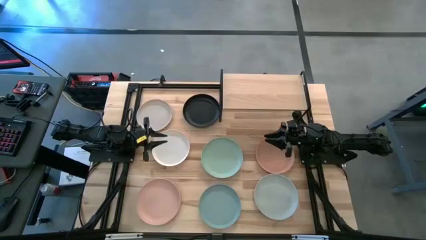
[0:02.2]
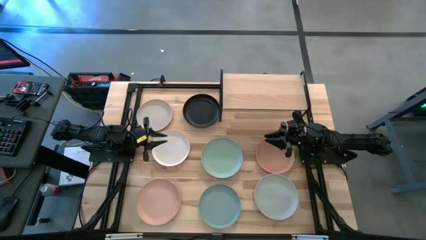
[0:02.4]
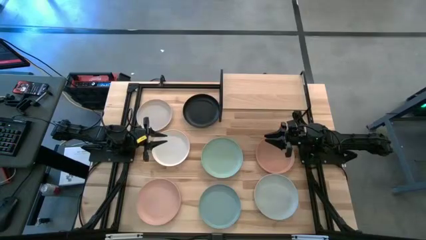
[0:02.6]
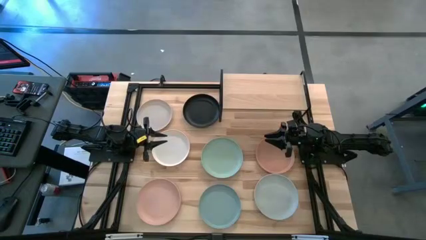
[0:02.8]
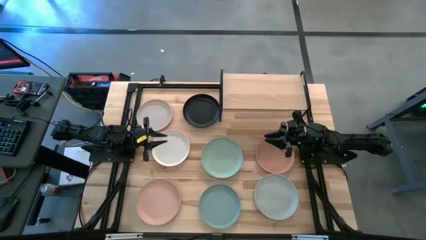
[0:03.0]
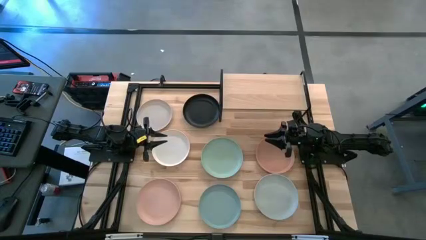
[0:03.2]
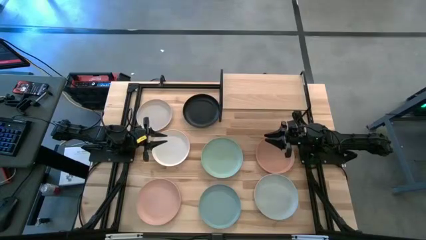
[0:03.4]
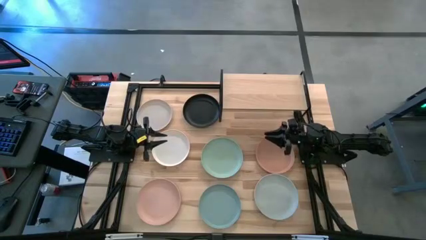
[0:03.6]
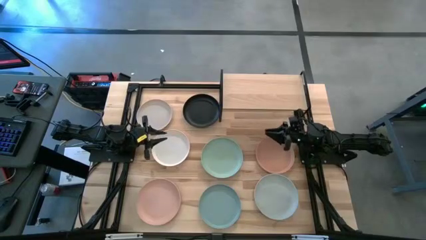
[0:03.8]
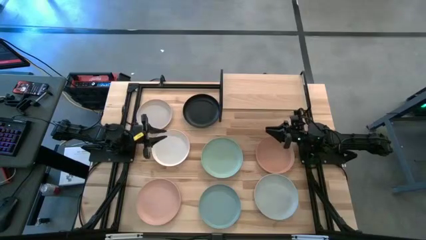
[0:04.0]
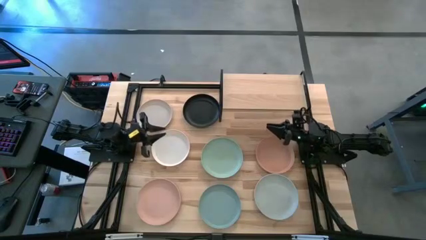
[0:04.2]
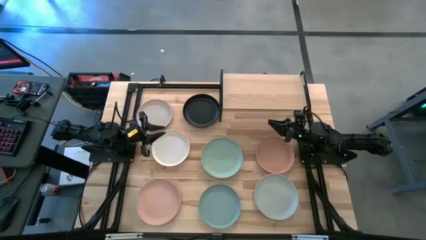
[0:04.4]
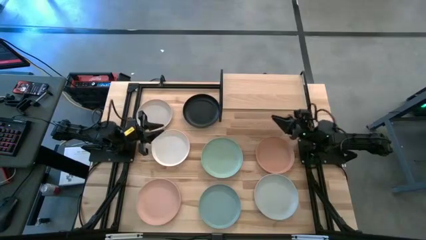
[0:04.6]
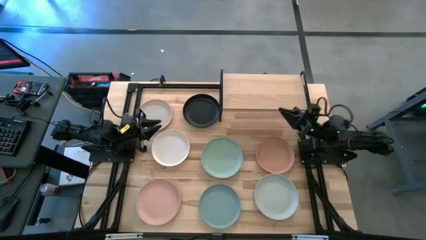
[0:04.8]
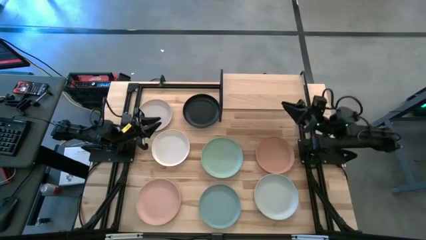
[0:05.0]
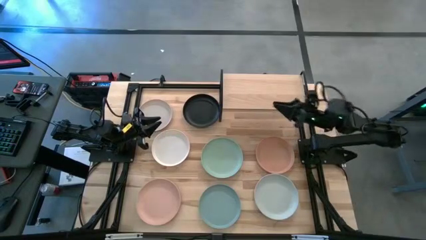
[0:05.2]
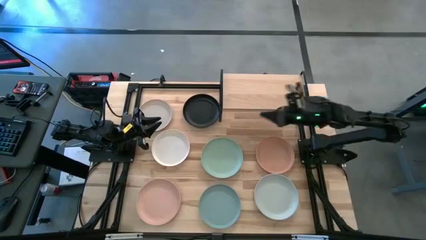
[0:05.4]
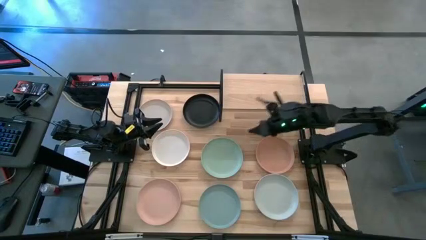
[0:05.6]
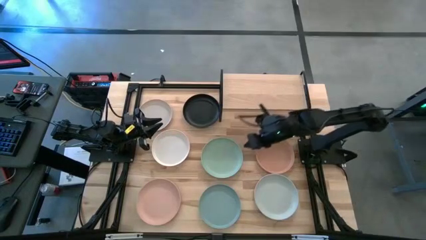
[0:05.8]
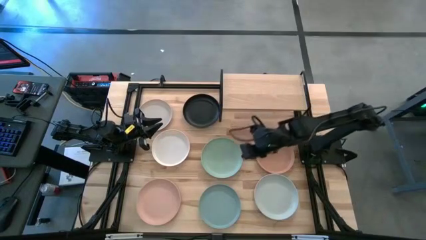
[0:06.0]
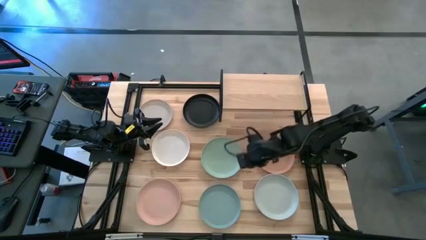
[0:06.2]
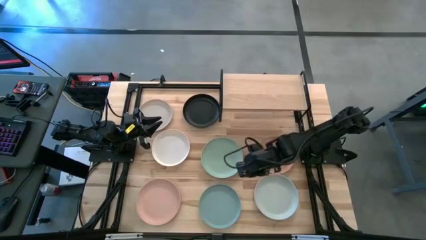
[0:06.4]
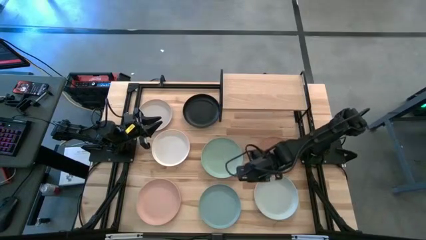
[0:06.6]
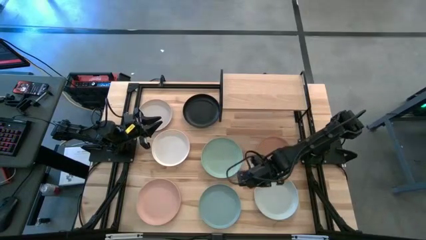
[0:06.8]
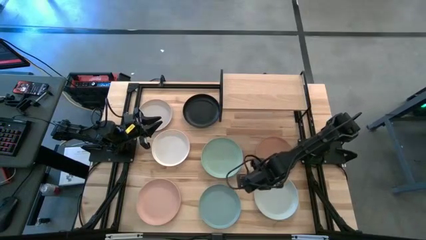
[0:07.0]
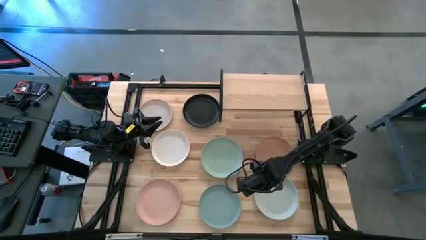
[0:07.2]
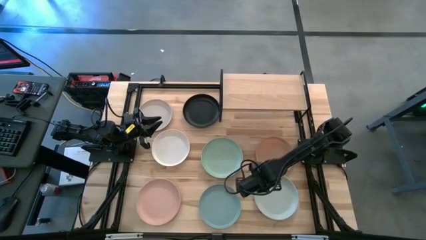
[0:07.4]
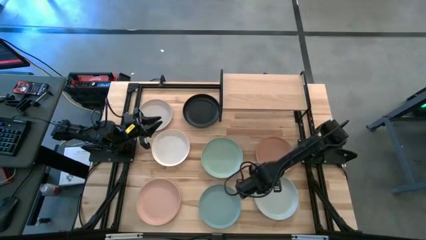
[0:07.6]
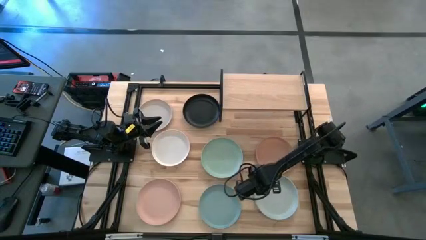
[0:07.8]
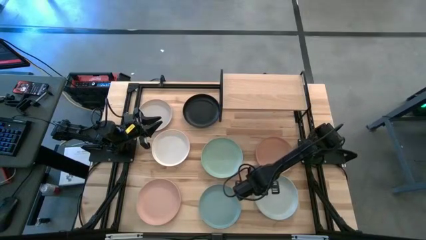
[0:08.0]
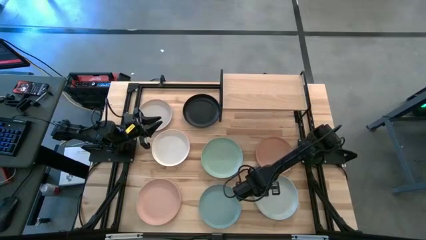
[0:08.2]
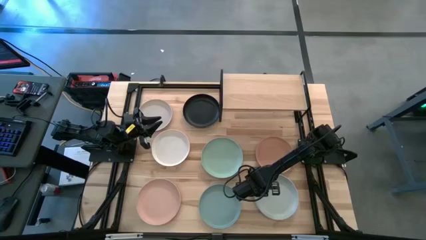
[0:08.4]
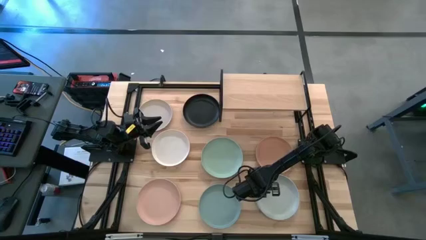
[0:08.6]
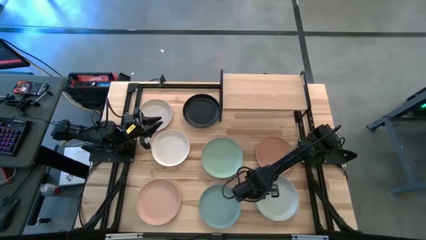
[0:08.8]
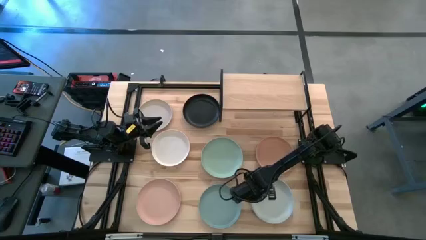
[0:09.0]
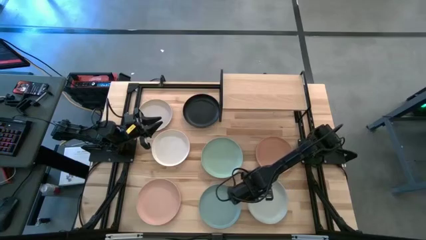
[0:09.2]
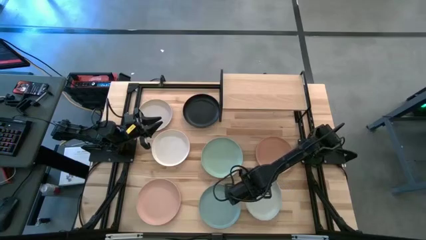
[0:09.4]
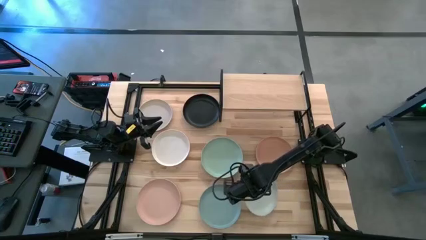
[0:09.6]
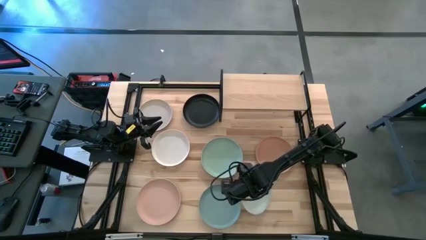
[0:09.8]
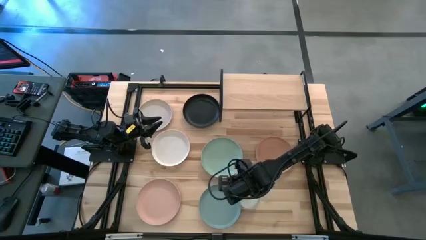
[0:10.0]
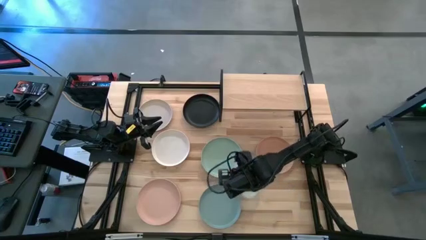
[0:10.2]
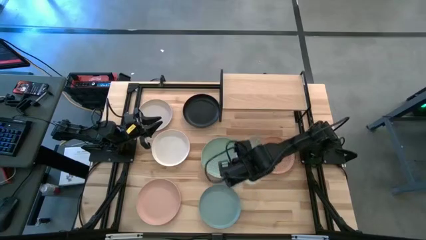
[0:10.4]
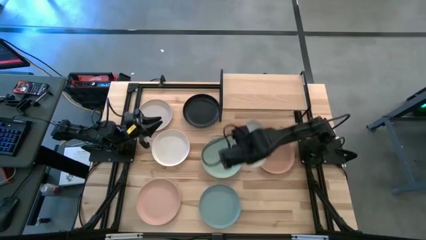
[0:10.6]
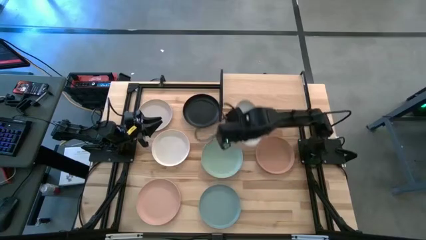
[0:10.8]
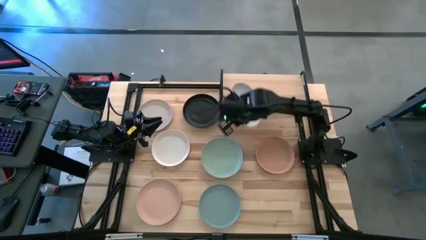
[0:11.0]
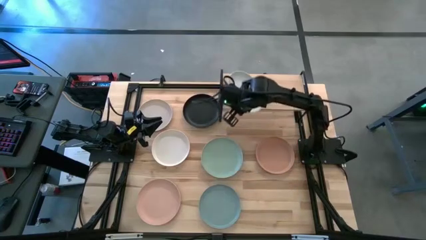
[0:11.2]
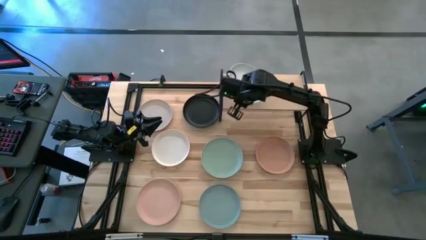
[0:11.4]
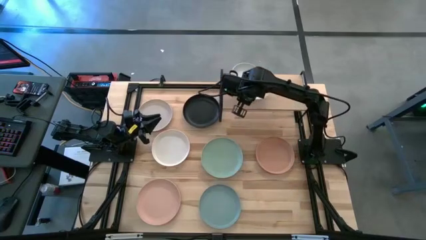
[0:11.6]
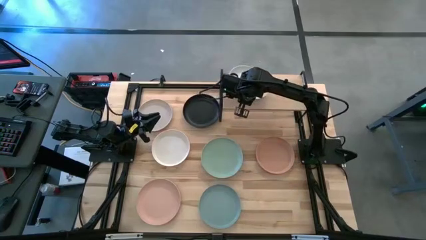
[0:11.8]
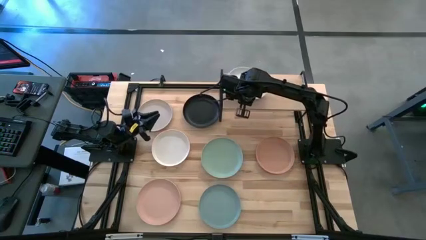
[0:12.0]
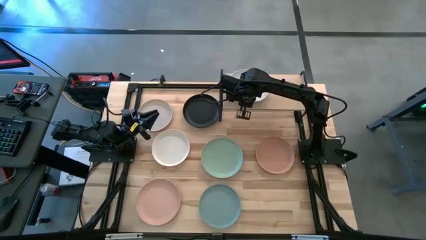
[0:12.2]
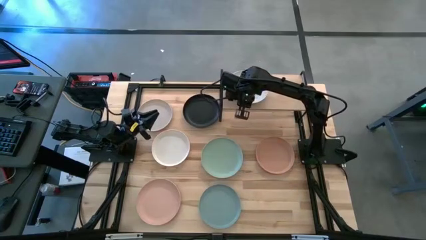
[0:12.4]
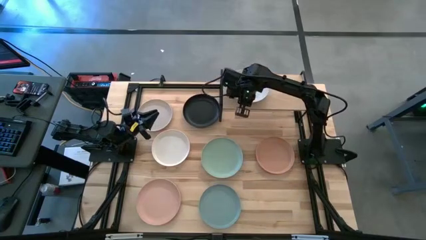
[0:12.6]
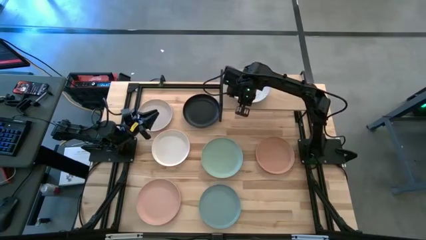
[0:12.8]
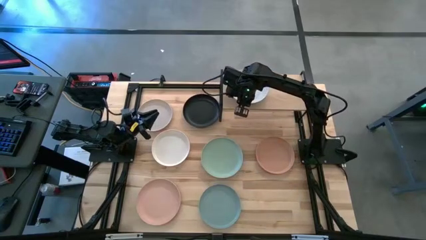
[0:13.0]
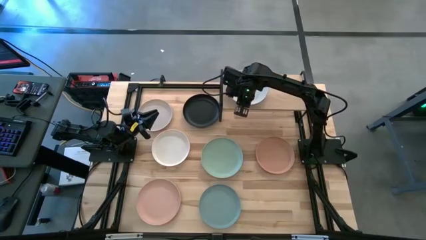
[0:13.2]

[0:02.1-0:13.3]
Task: Place and stack plates onto a shelf
Put the bottom right white plate on the shelf

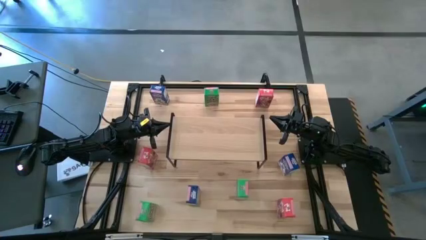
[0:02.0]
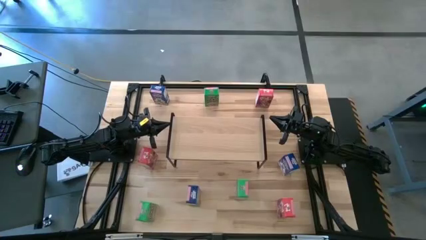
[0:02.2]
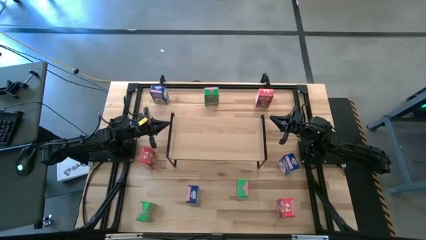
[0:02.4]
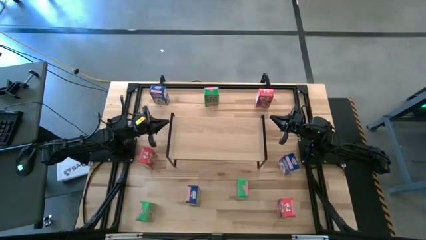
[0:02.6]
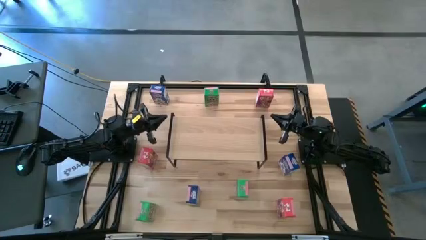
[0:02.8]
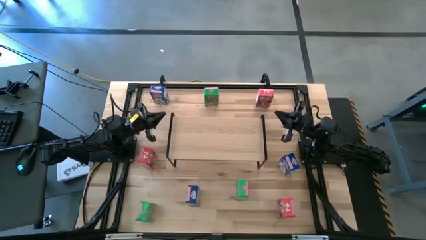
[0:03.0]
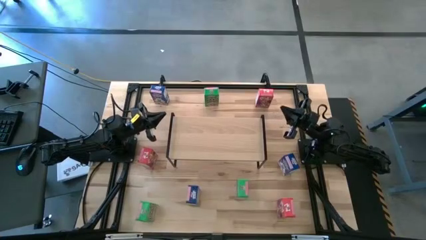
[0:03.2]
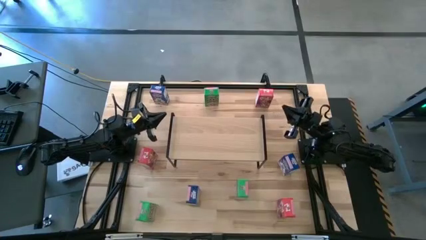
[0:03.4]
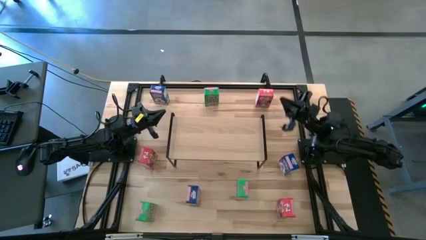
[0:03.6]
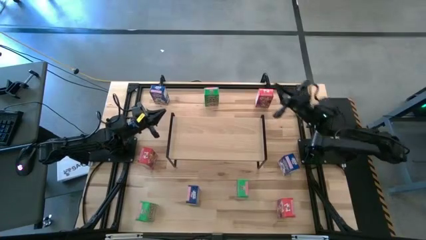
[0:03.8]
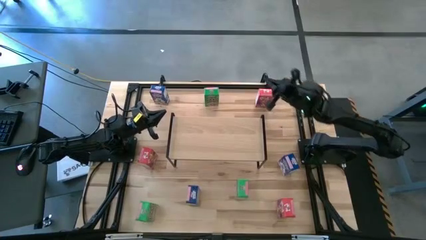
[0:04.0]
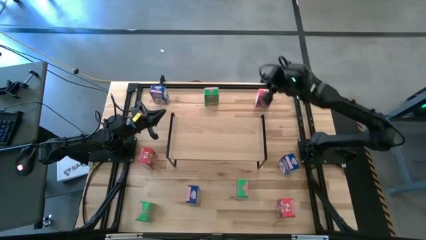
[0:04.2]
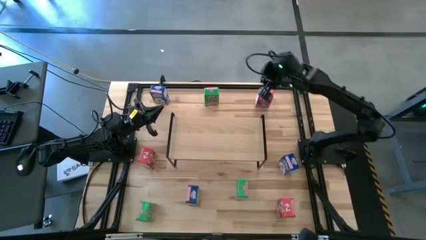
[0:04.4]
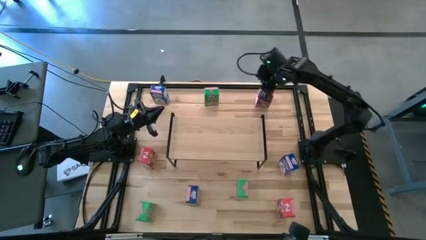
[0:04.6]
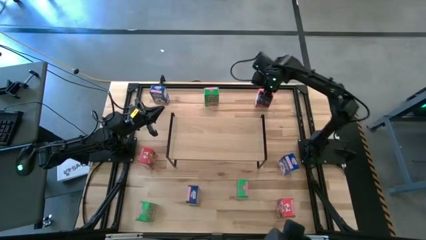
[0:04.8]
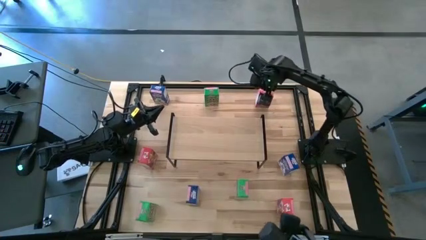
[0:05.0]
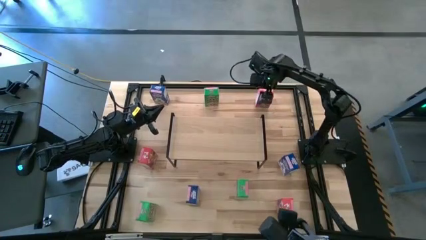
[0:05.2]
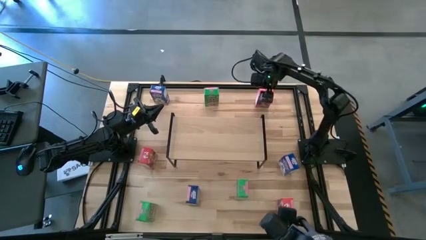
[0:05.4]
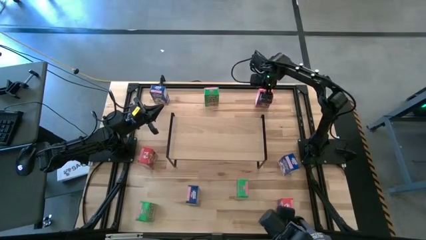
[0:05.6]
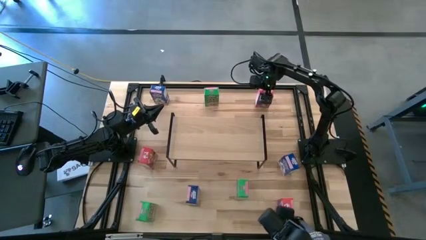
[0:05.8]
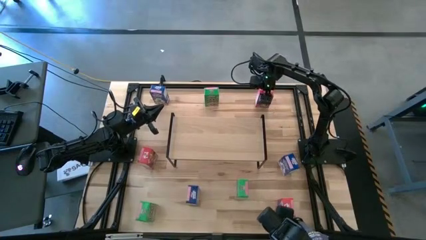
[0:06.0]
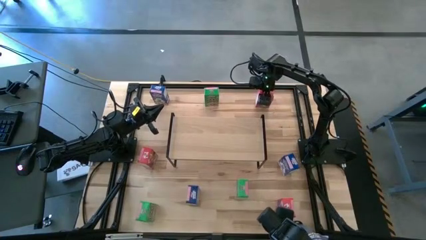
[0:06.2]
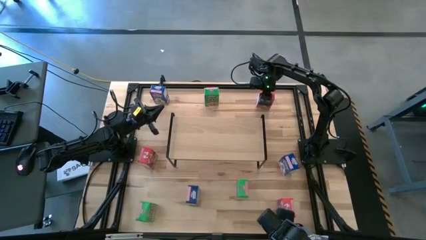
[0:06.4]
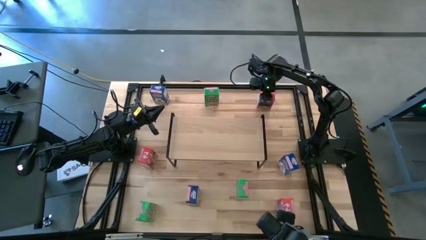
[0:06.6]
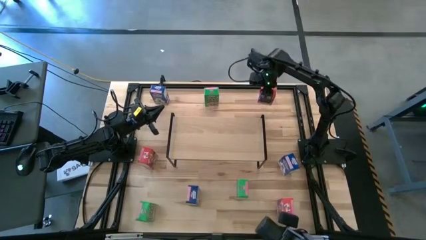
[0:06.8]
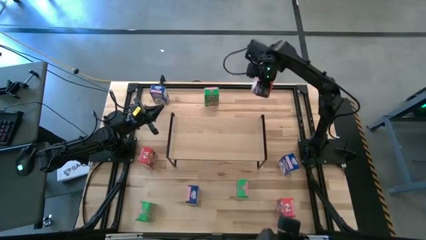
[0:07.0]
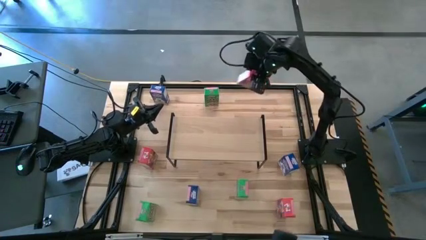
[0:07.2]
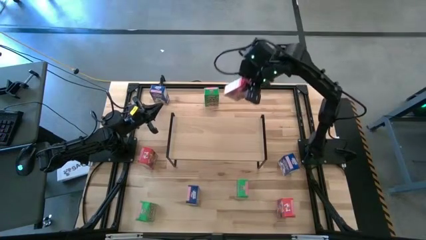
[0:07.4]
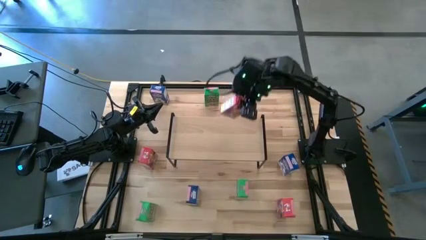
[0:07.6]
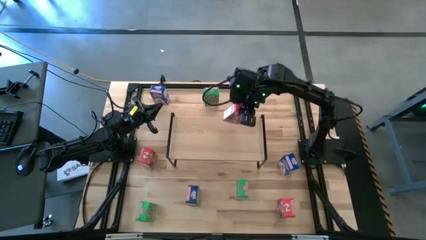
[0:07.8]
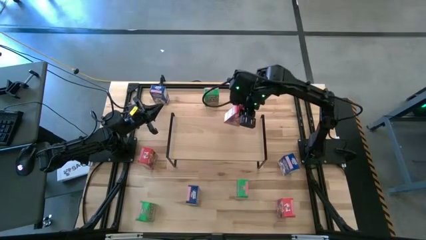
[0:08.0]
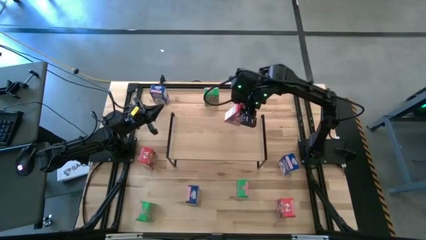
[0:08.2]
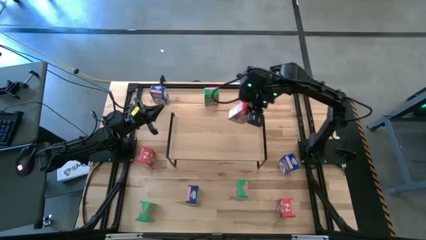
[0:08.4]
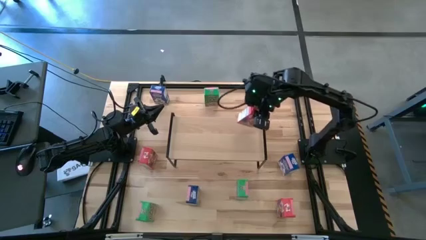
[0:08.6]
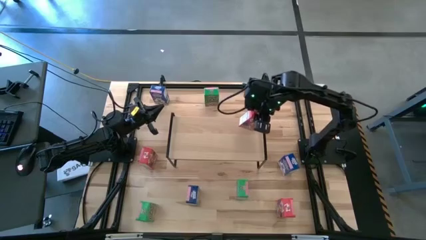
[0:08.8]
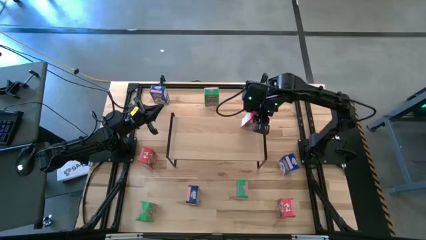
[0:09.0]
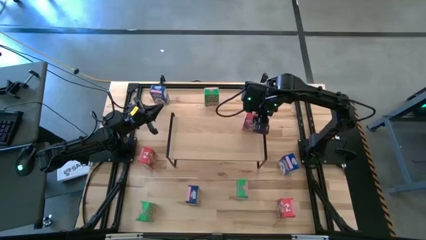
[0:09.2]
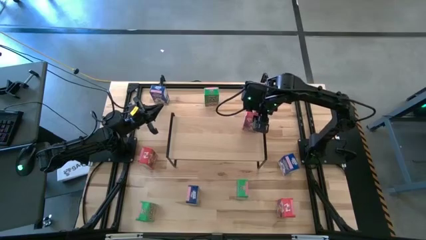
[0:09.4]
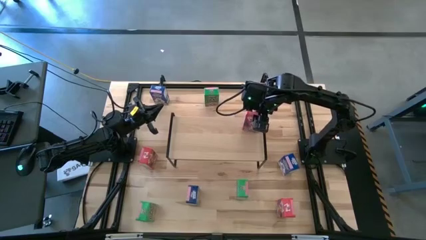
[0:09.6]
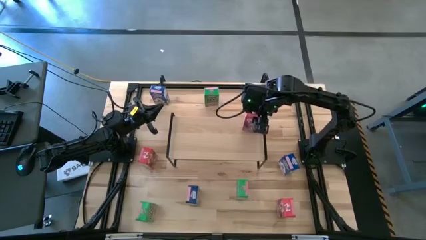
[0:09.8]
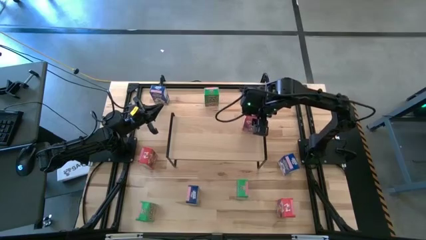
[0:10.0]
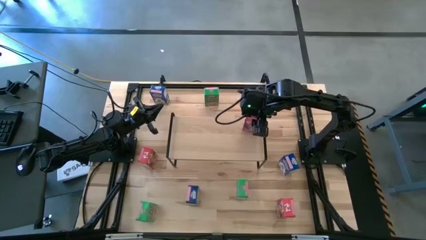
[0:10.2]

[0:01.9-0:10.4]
Task: Stack cereal on shelf
Put the top right red cereal box on the shelf
